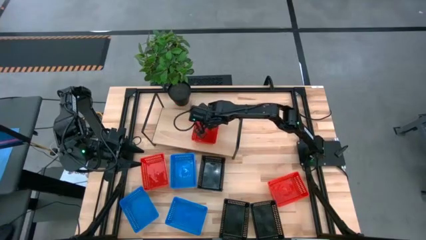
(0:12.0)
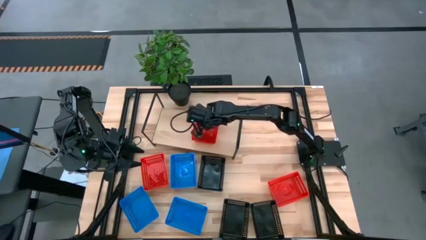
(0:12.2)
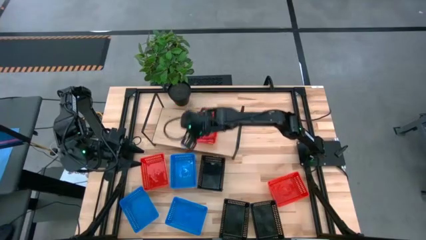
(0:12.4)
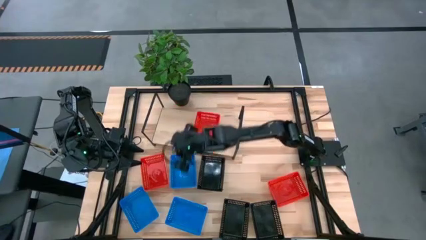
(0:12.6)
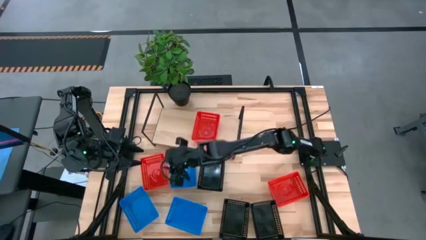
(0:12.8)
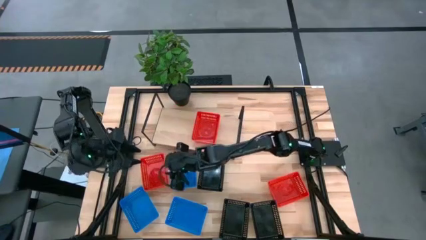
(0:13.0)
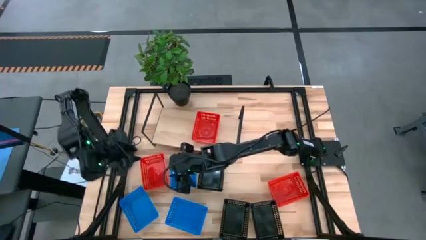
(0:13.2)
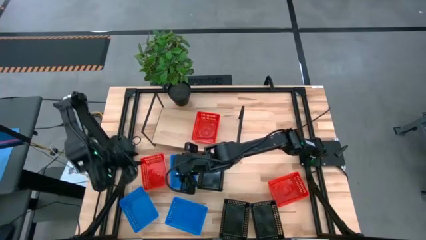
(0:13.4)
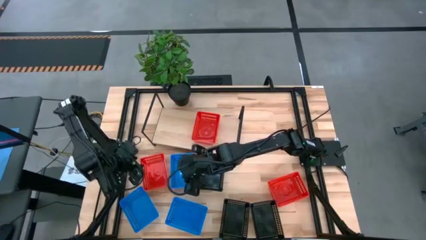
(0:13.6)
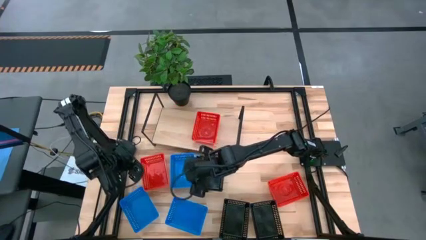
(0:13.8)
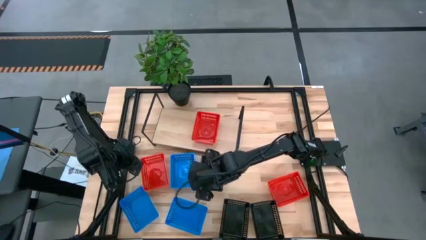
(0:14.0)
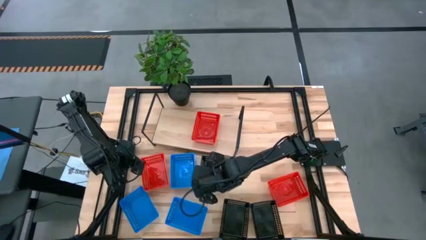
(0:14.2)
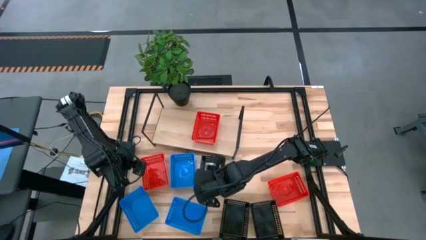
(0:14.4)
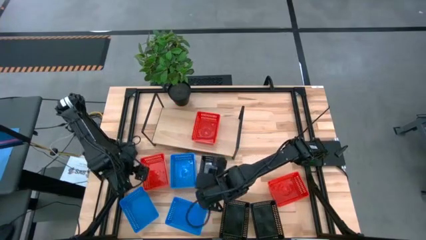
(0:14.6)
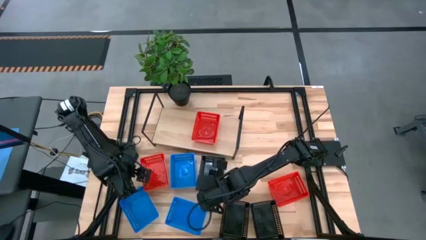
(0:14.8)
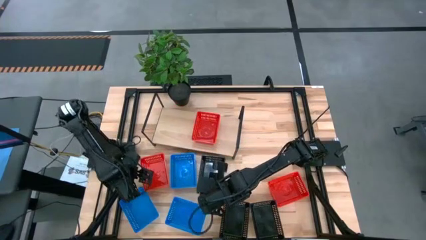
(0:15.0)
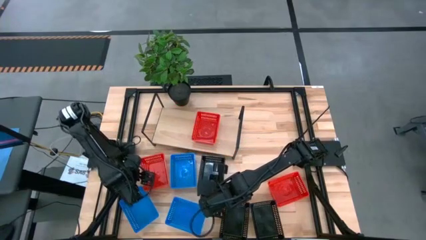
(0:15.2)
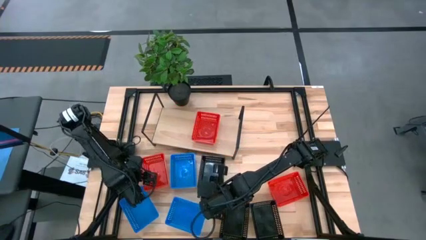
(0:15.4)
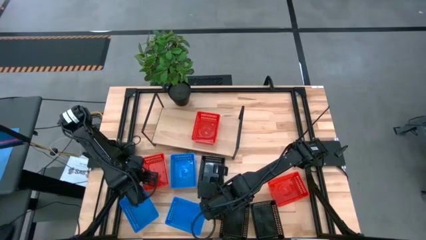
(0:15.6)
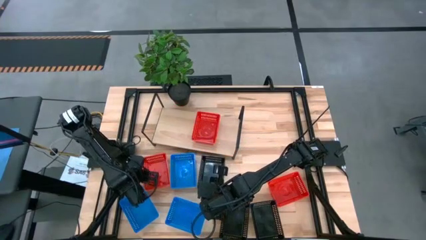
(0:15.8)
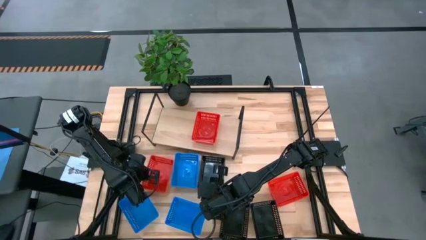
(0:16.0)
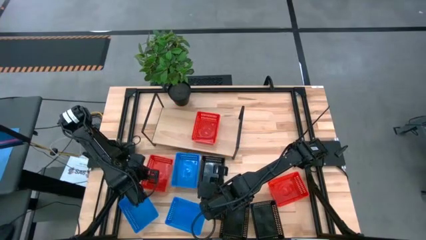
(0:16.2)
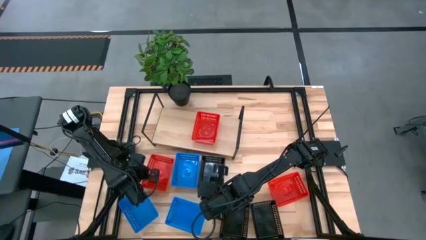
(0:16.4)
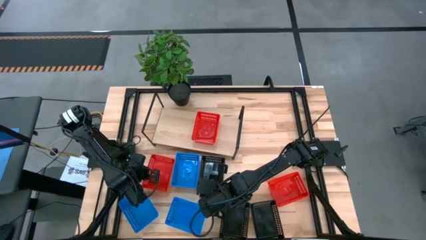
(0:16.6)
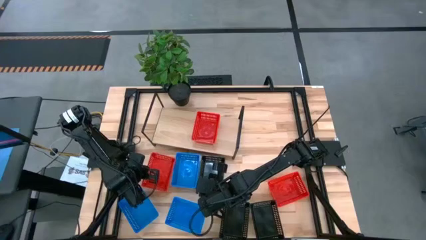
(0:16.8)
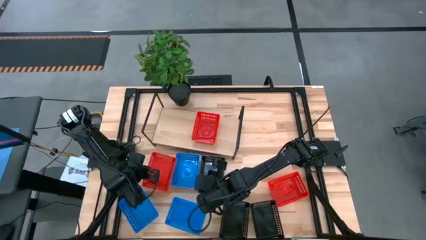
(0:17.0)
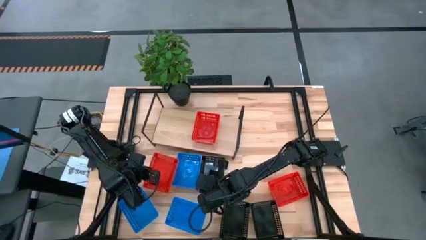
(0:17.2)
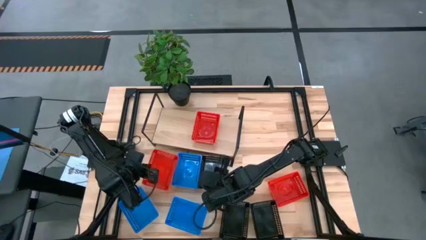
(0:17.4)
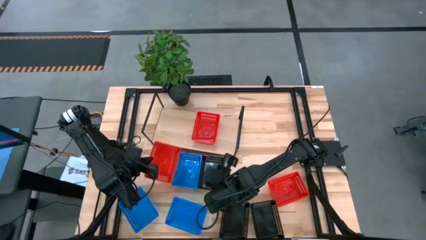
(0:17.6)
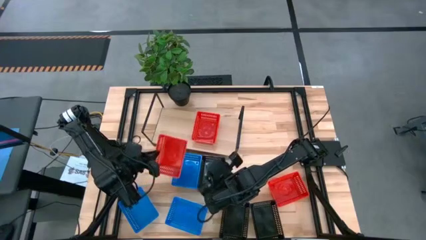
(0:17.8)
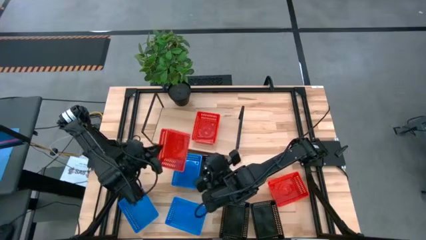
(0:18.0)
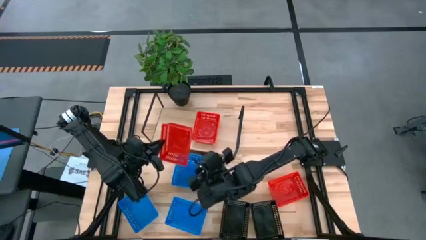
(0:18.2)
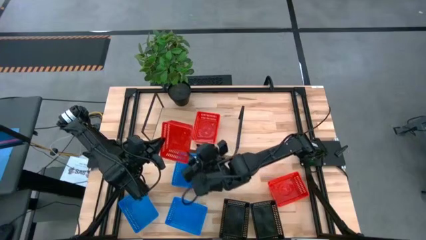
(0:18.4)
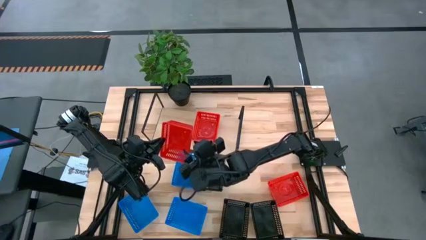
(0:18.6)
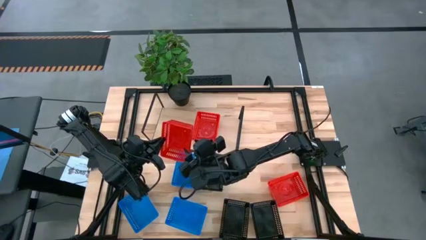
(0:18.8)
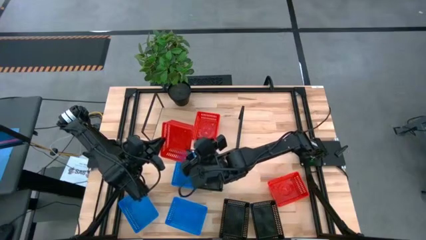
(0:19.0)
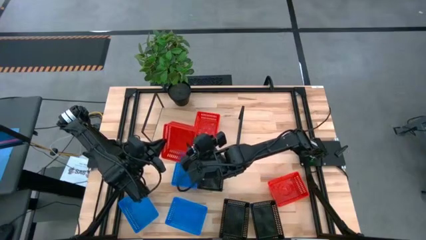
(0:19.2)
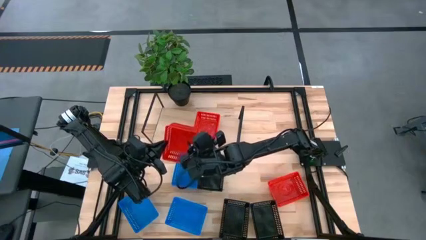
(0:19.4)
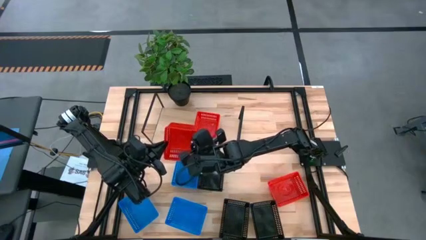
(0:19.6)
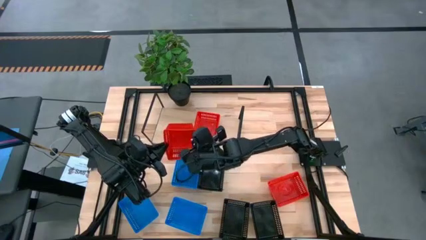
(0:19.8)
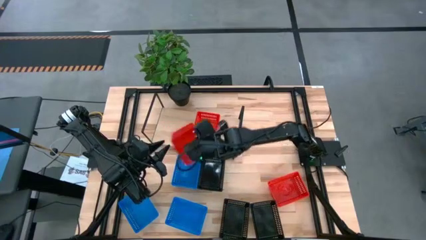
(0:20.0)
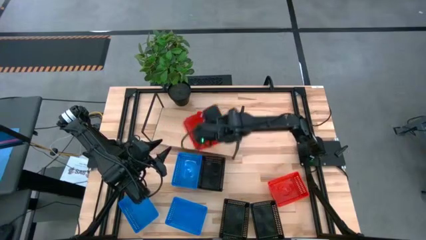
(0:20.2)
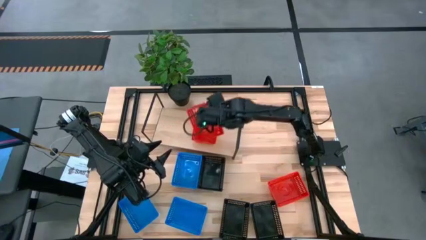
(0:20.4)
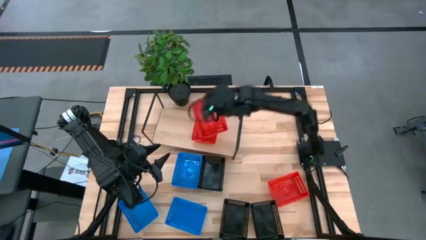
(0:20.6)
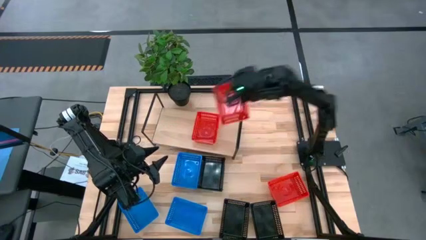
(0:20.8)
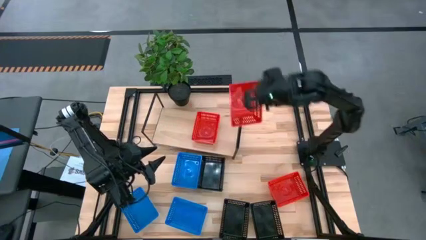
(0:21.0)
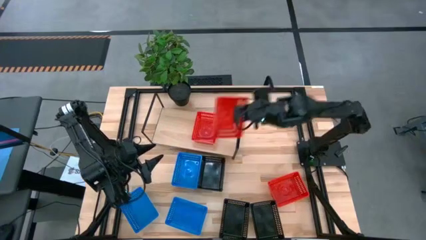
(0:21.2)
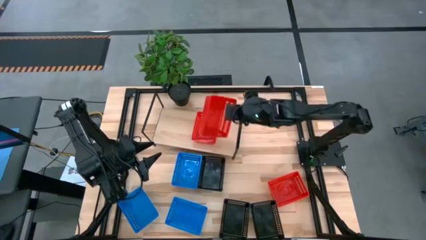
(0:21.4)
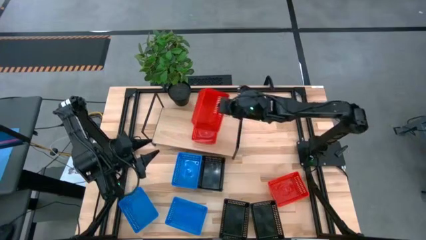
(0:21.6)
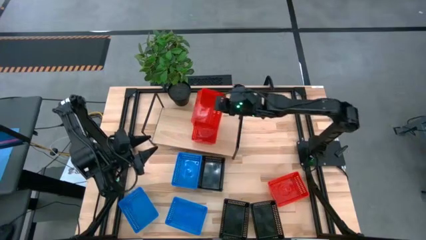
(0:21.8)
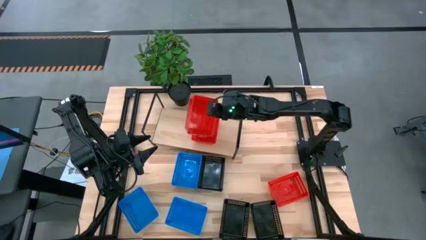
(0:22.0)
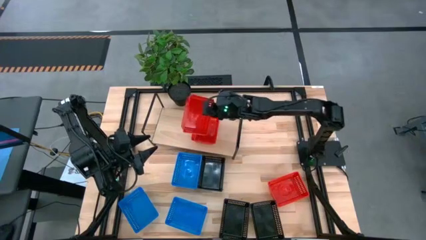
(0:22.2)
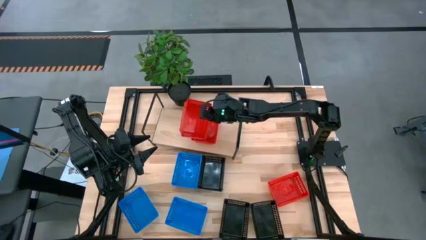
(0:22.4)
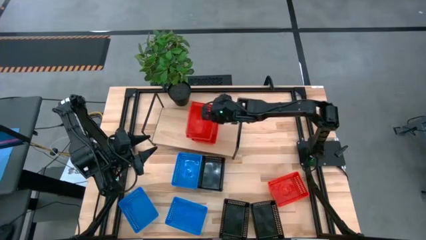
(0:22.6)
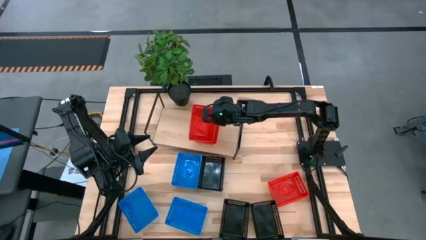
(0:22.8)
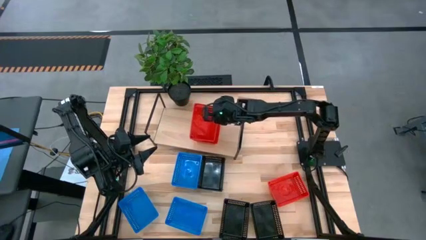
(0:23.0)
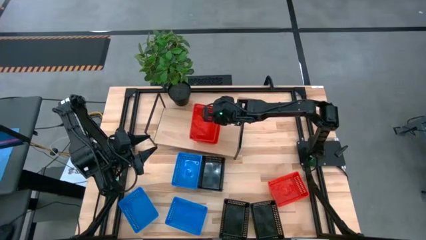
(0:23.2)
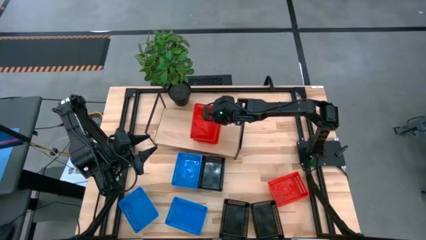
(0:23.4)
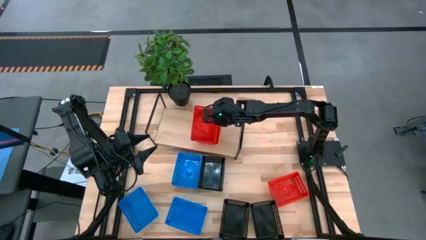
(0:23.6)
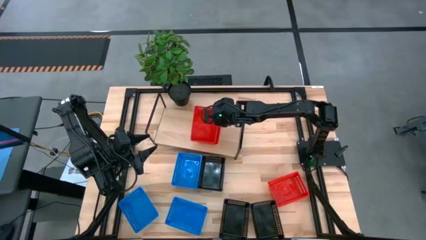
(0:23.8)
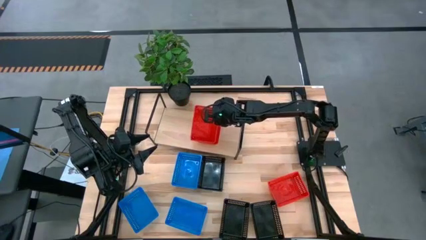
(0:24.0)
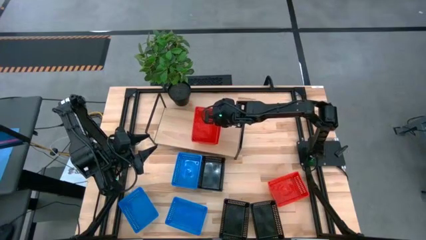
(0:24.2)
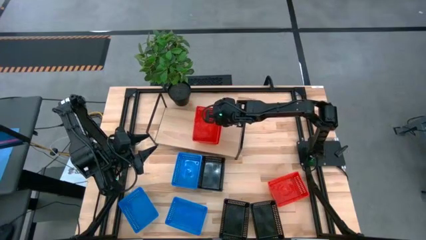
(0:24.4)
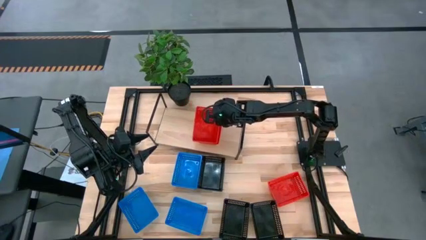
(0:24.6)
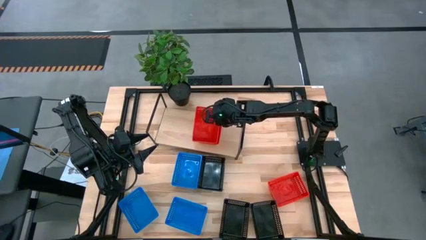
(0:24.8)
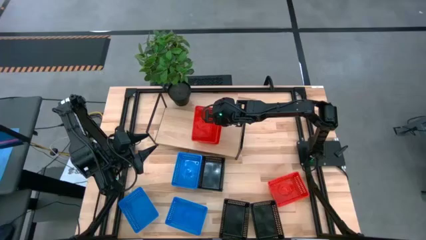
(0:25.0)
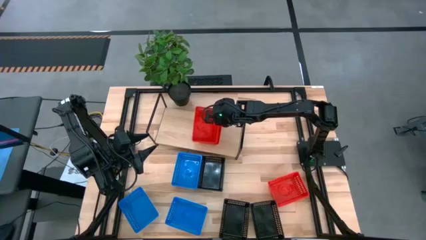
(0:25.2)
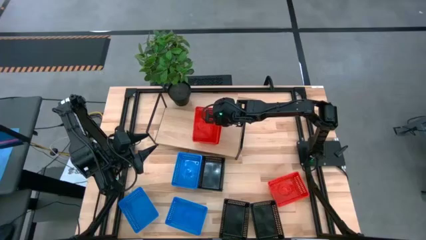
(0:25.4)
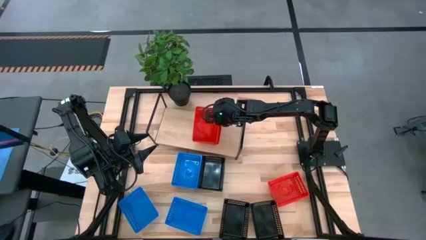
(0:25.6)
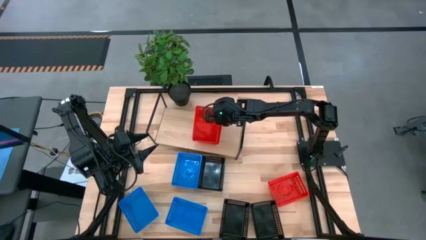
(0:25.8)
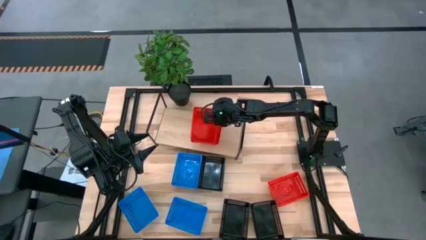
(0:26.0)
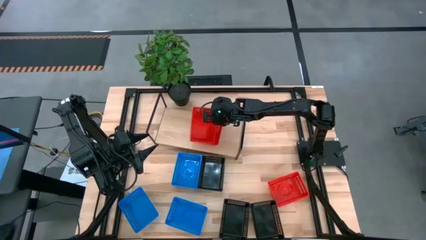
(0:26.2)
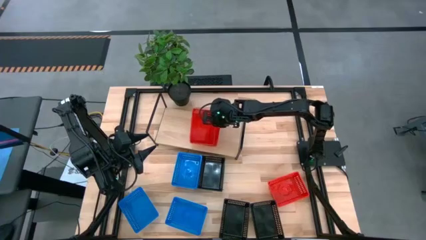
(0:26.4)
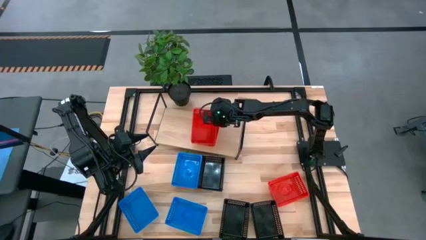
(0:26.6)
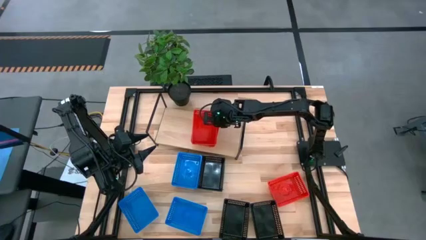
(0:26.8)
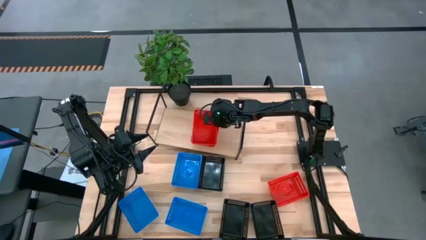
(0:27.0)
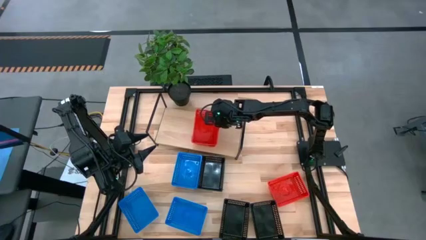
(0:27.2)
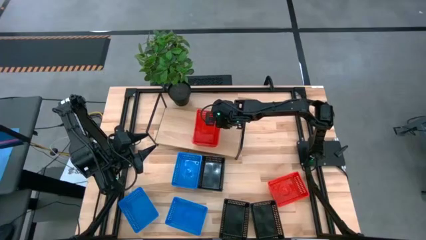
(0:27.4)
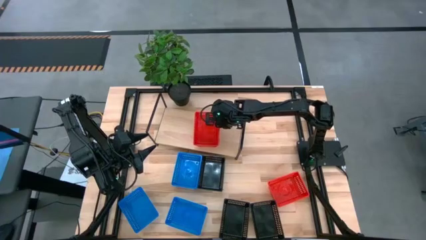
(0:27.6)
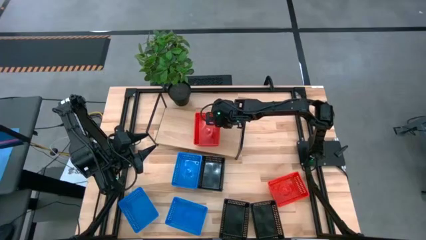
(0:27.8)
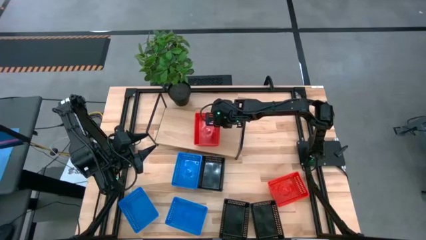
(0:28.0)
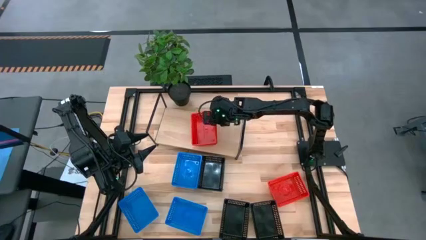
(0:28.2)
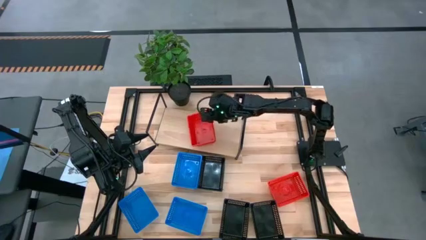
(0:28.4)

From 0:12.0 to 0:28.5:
Task: Stack baskets on shelf by color
Stack the left red basket on top of the other red basket on the shelf
